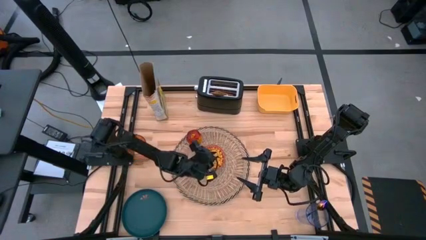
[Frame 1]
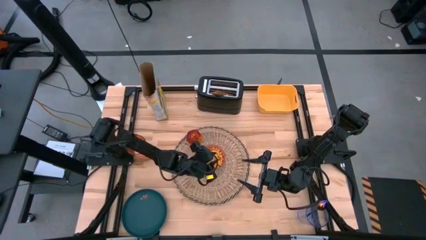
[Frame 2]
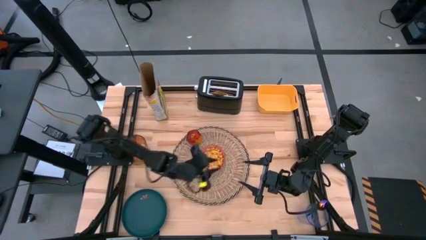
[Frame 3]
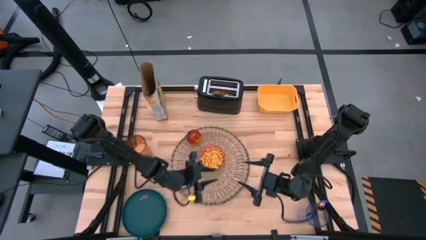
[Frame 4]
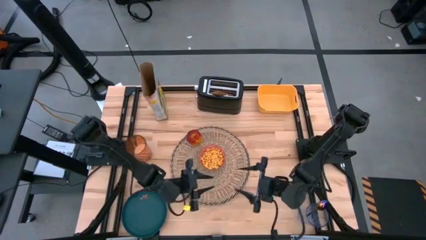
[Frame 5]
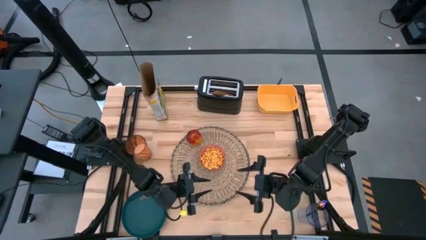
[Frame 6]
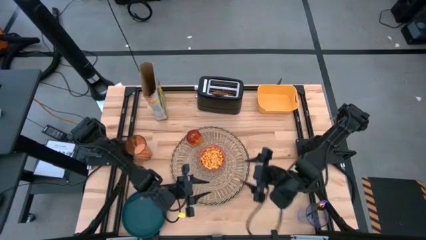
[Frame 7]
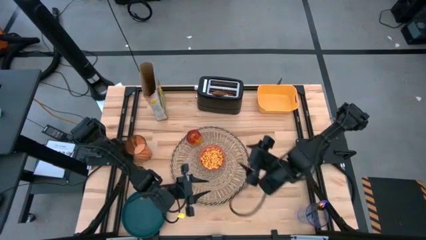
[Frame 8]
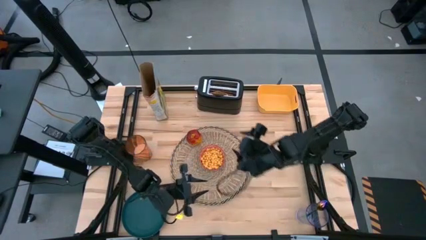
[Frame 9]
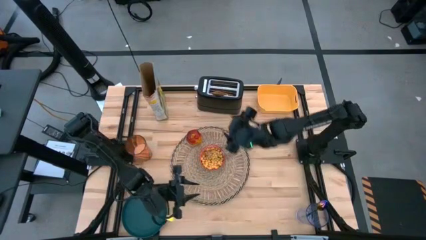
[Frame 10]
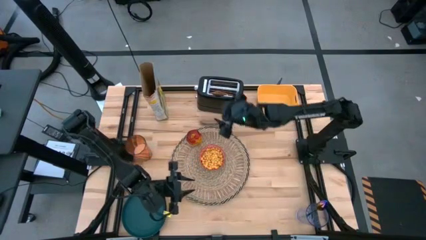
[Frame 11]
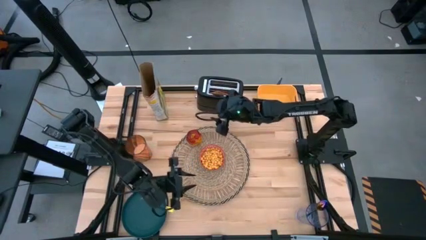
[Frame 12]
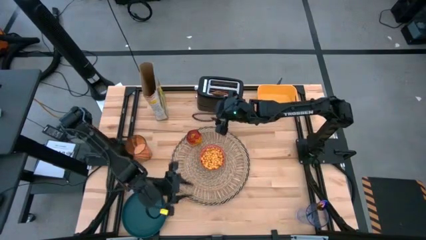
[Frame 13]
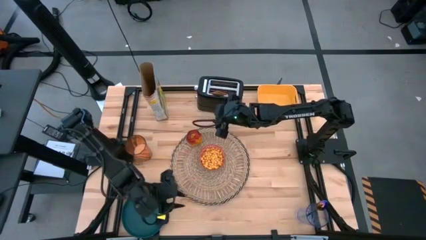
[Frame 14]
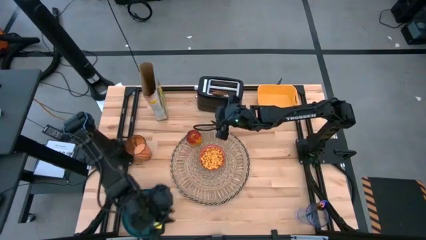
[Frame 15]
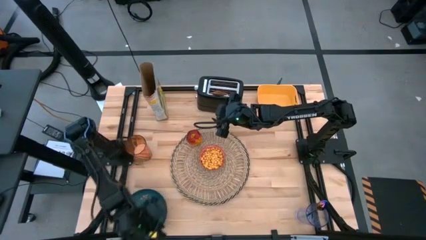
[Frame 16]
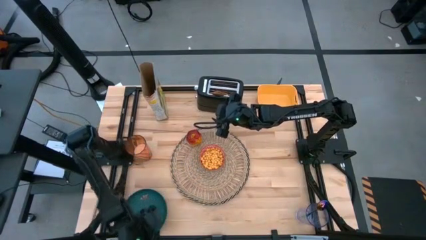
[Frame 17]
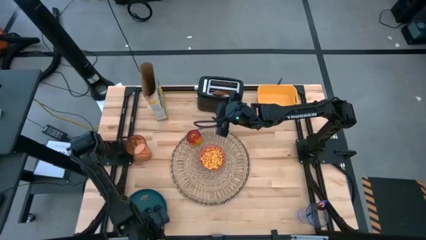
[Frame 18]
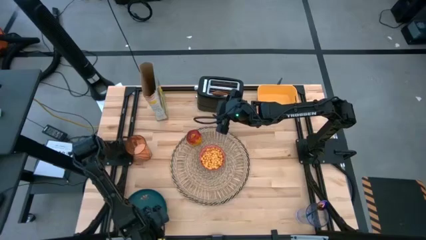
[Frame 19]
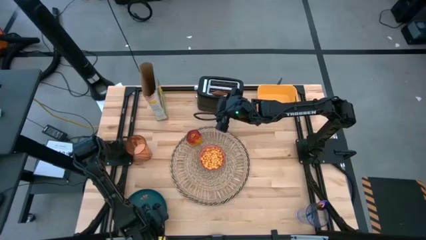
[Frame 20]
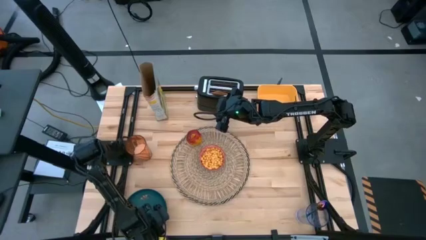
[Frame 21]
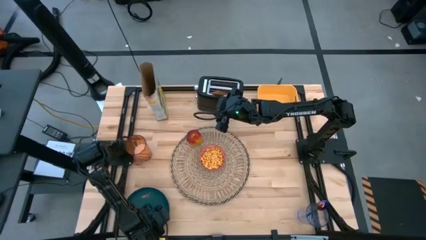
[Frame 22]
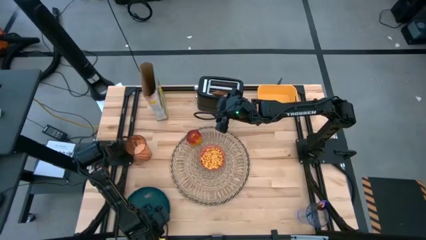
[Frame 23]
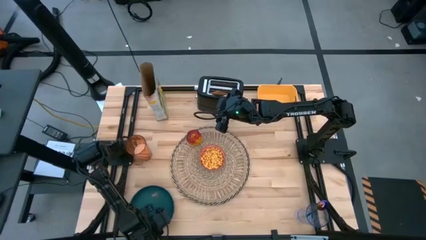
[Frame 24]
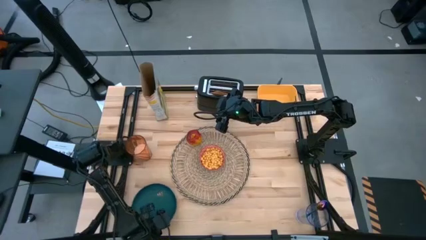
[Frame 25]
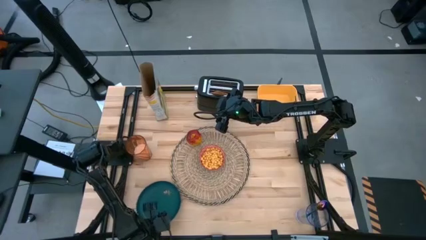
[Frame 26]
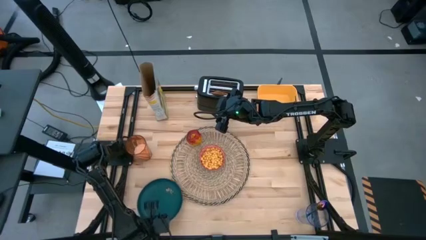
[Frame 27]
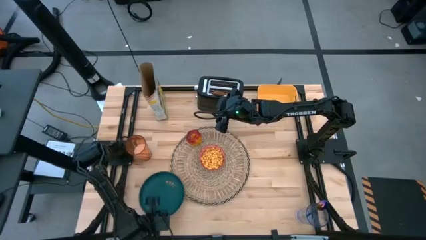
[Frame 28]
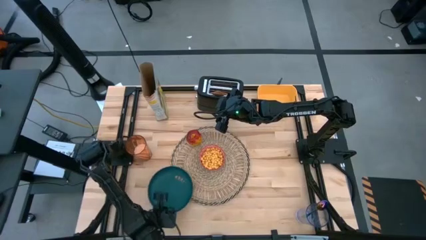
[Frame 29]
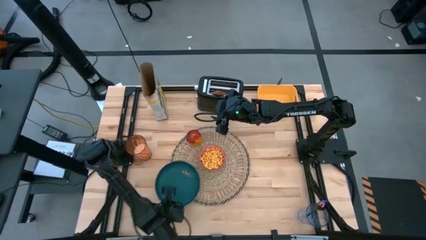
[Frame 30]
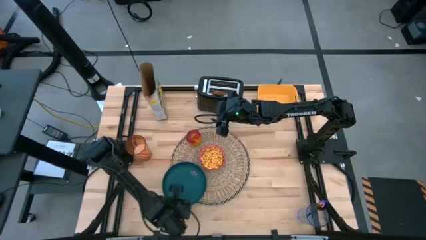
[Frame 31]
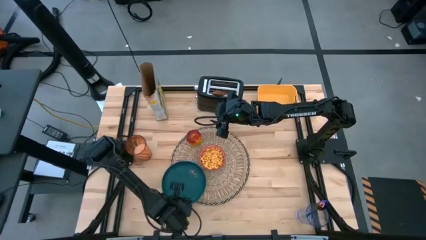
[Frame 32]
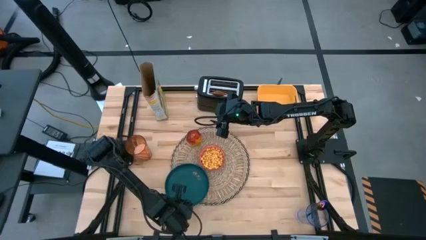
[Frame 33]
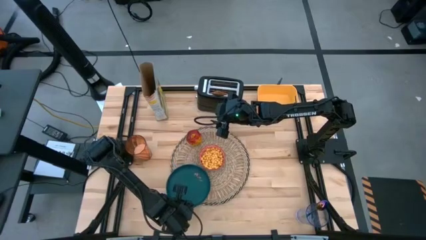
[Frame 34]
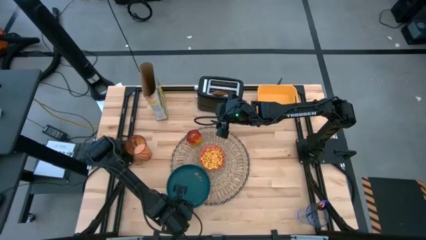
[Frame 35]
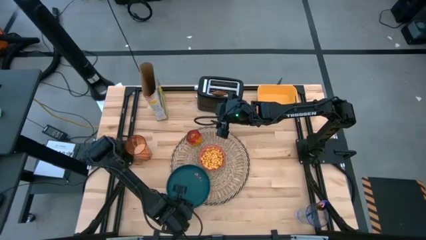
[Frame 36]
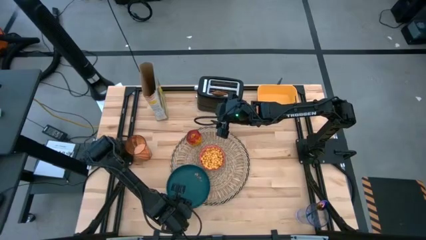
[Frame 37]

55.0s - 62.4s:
Task: Arrange a breakfast setting
Put the dark green plate on the brown placemat

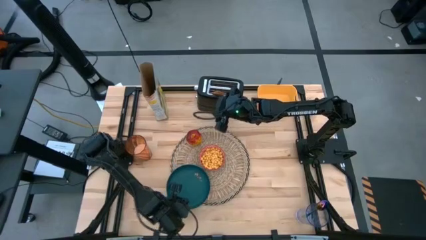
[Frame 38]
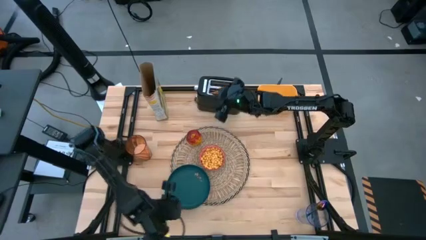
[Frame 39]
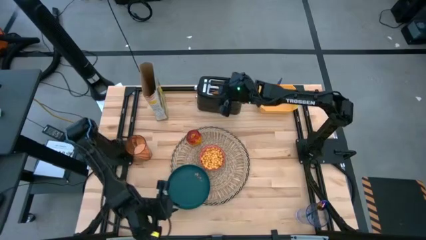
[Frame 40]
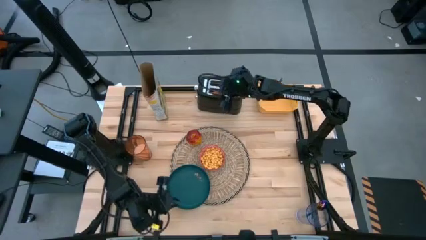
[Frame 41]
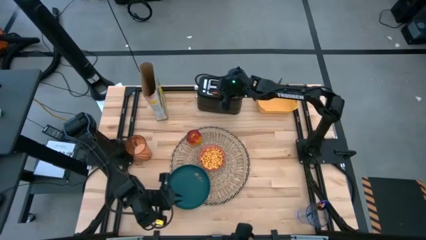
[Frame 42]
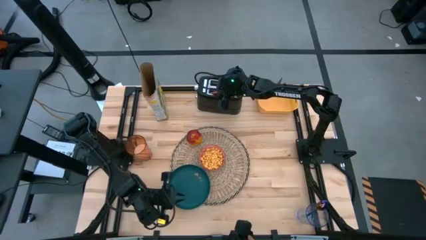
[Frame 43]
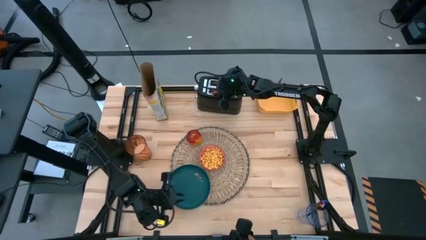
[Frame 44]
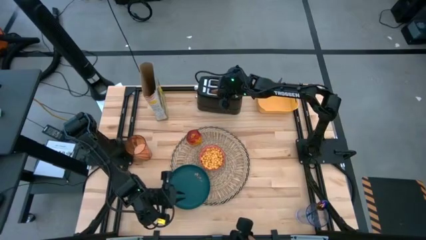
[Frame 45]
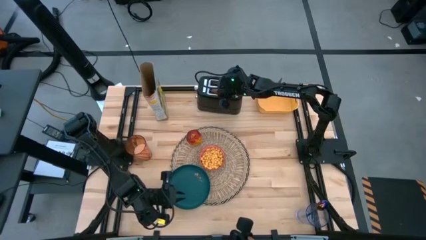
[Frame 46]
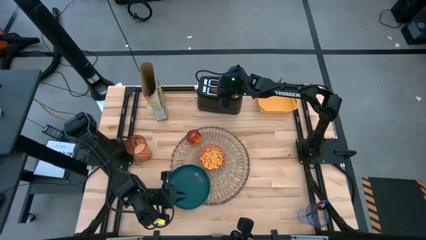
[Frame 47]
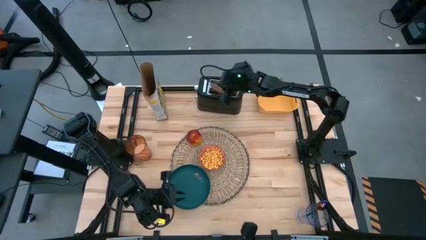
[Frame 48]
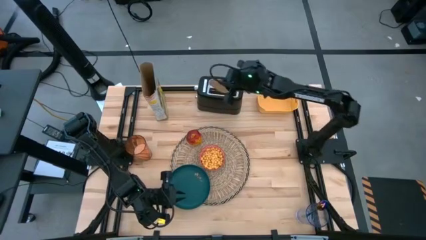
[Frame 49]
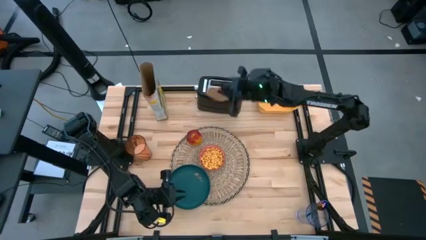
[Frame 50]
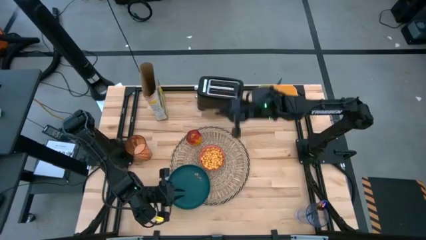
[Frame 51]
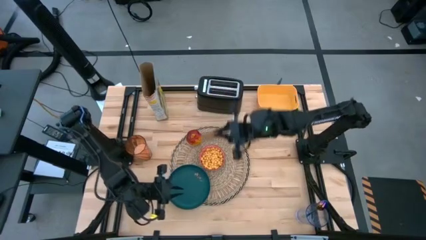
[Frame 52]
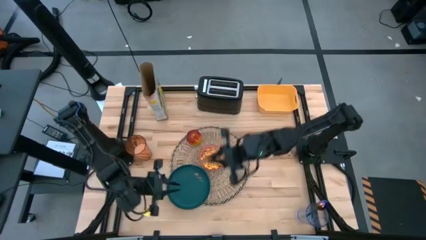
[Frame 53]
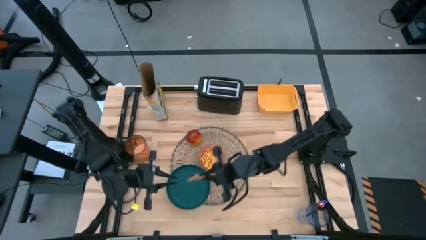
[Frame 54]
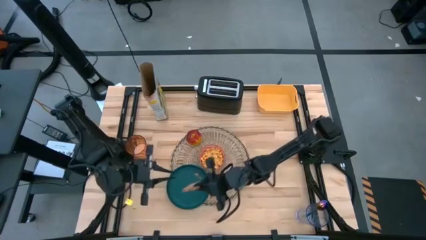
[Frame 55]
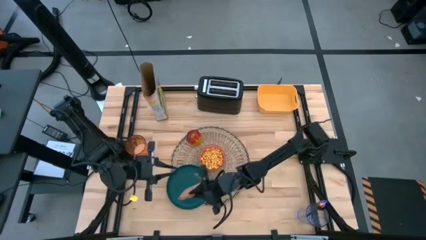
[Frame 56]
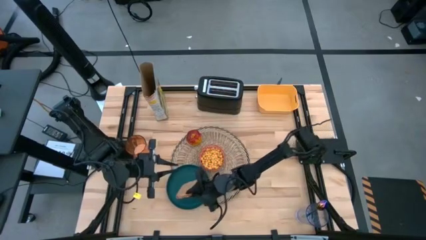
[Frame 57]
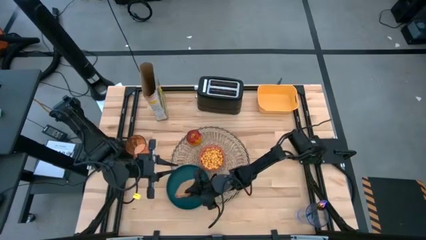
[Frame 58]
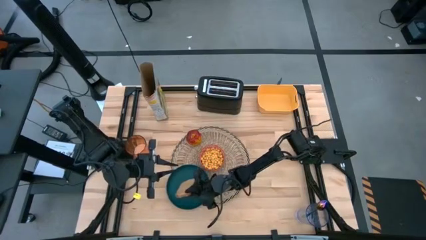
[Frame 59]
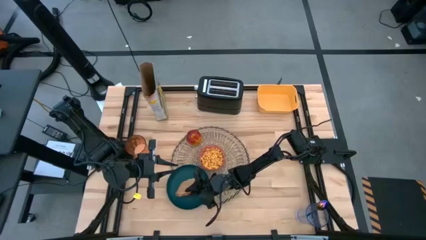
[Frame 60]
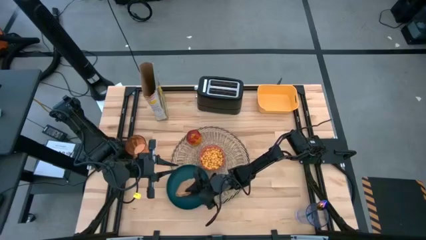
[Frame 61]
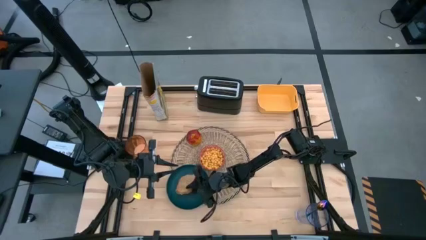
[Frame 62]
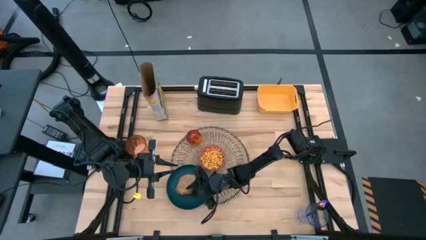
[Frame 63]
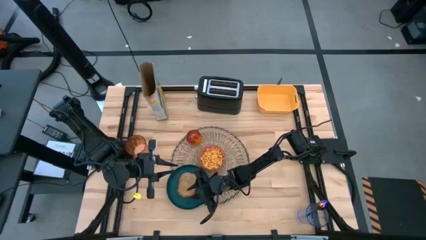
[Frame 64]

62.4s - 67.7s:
Put the bagel on the dark green plate

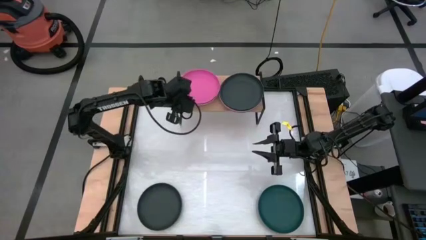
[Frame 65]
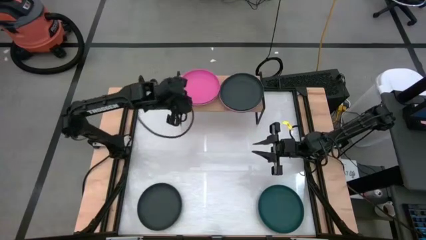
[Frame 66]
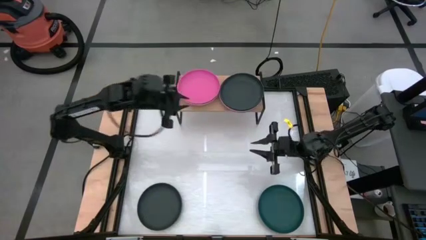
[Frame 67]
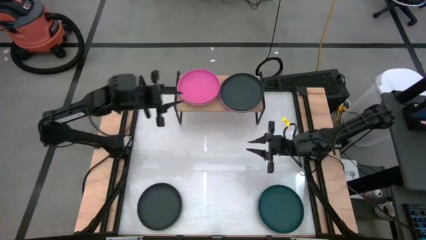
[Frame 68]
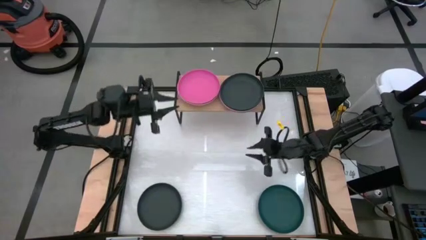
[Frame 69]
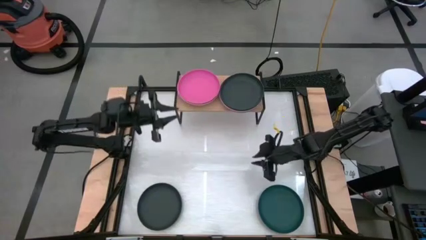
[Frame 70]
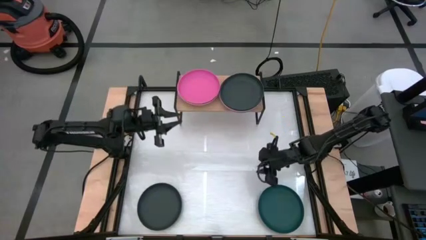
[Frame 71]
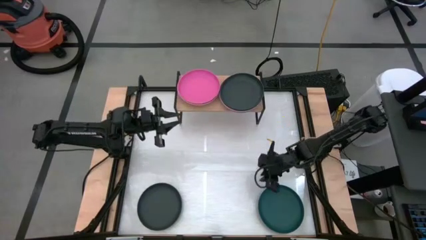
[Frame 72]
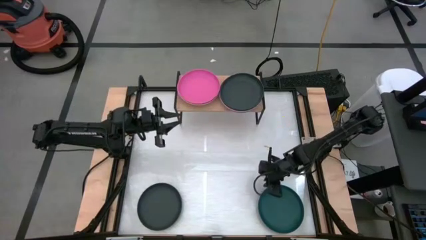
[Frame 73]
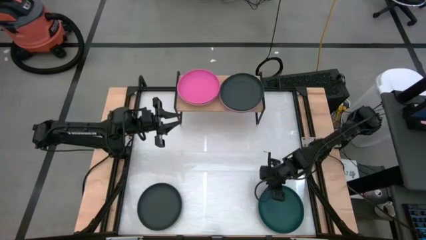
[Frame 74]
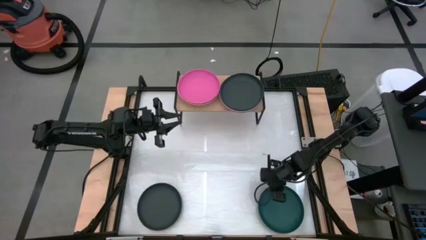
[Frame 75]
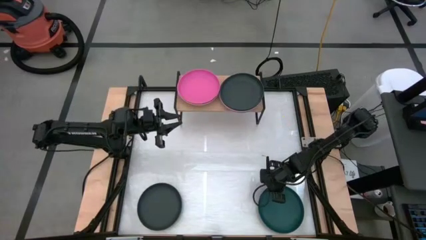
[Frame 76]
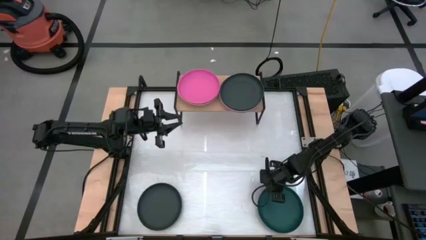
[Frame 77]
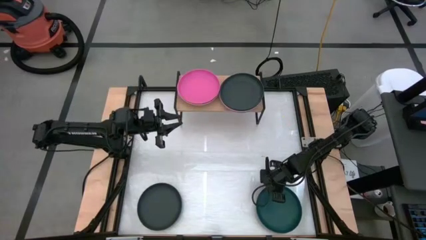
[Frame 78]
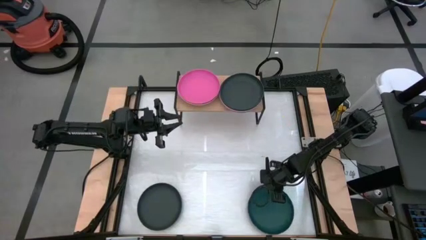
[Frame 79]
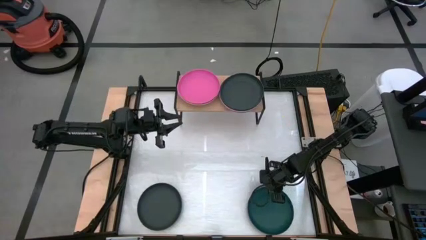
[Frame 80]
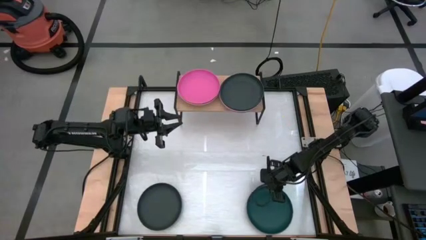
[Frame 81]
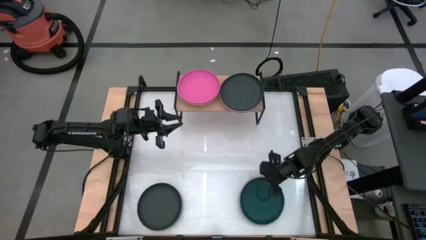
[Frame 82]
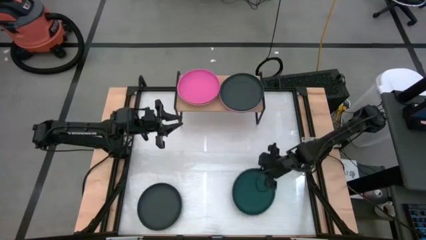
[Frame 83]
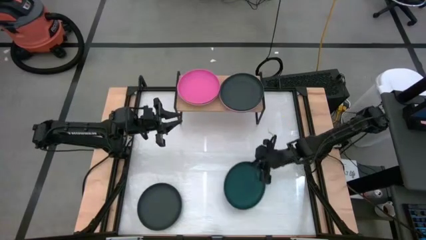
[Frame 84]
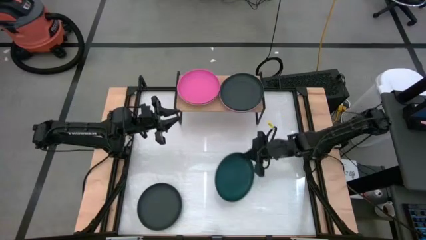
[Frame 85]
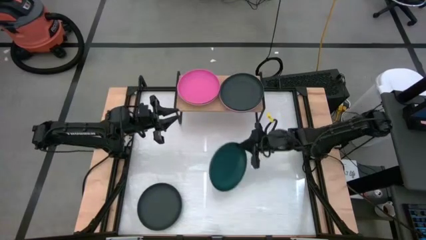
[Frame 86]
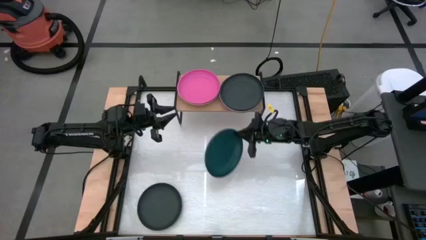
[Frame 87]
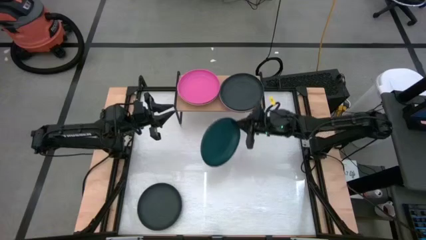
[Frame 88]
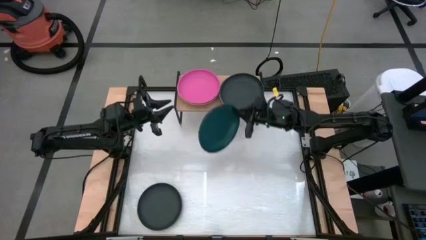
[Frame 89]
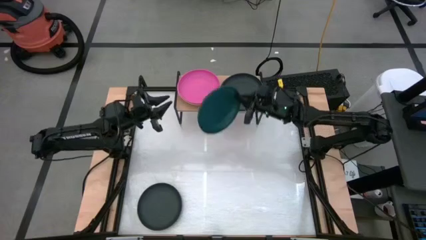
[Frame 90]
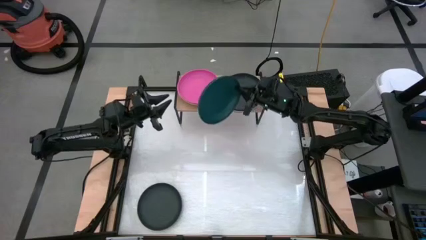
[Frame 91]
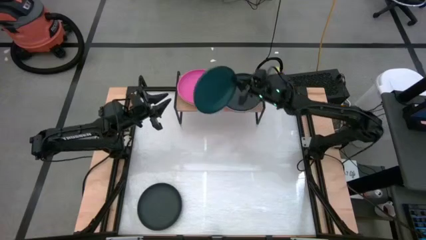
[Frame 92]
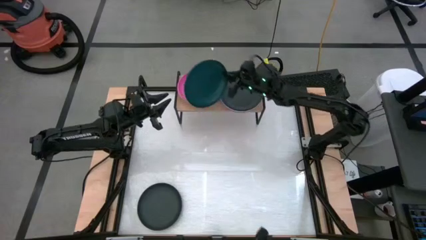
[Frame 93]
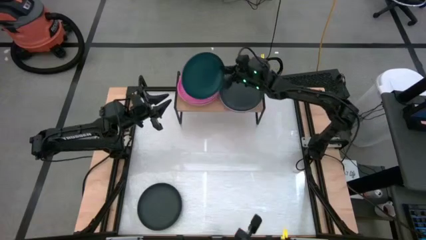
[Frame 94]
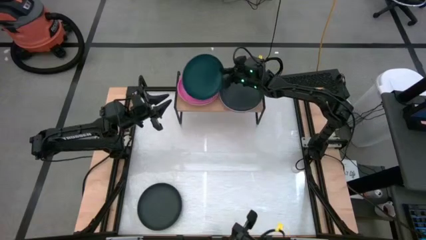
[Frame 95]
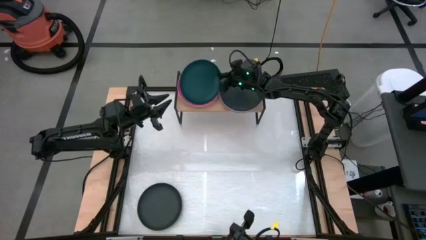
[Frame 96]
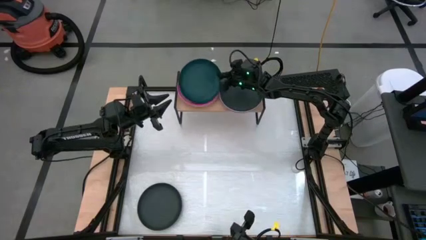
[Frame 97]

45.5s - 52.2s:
Task: Place and stack plates onto a shelf
Stack the dark green plate on top of the pink plate on top of the shelf
